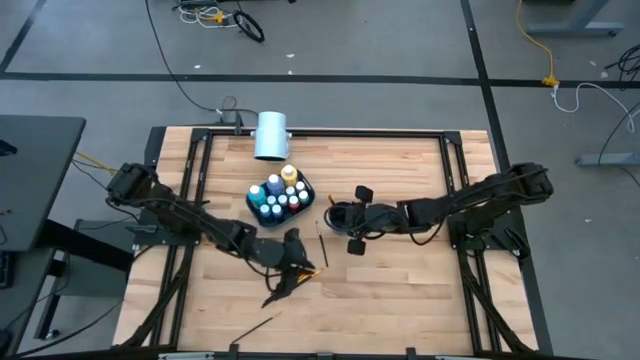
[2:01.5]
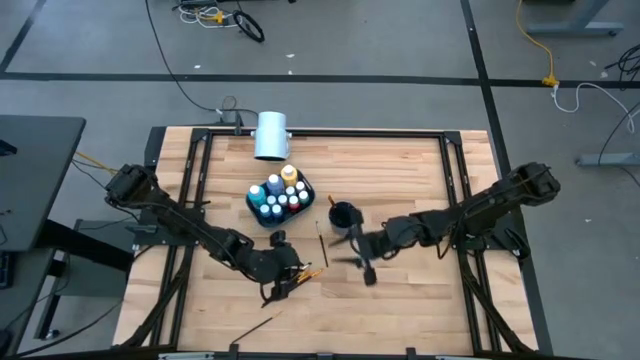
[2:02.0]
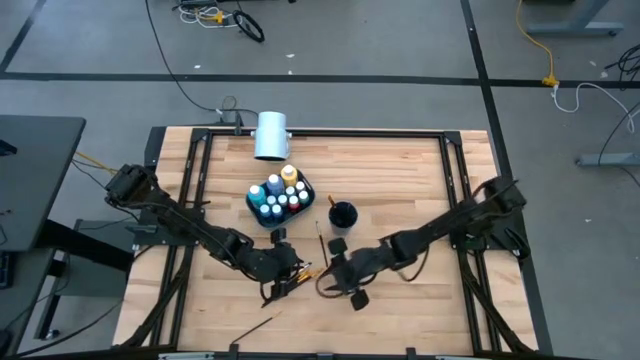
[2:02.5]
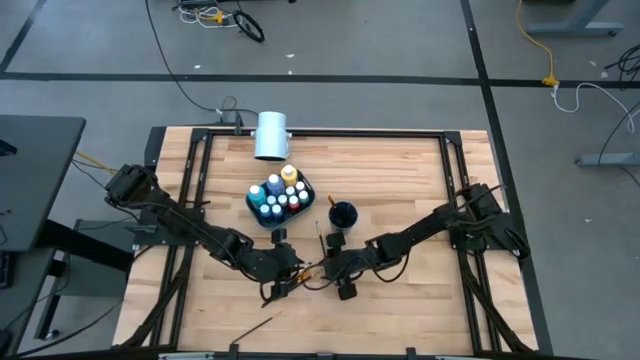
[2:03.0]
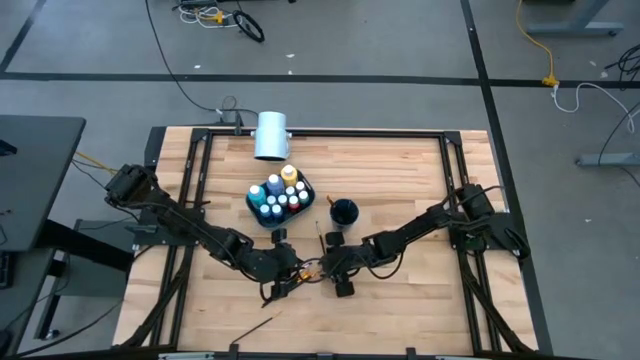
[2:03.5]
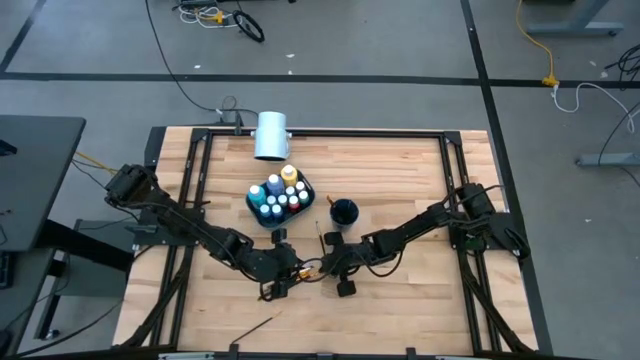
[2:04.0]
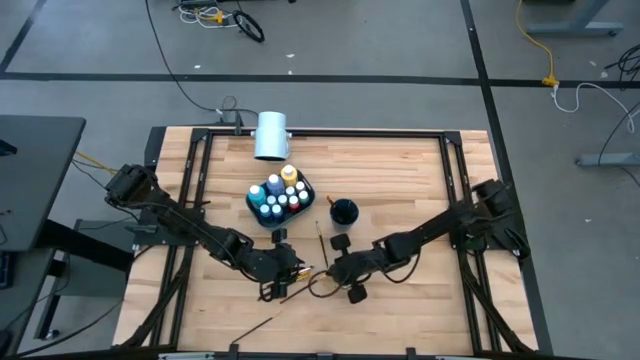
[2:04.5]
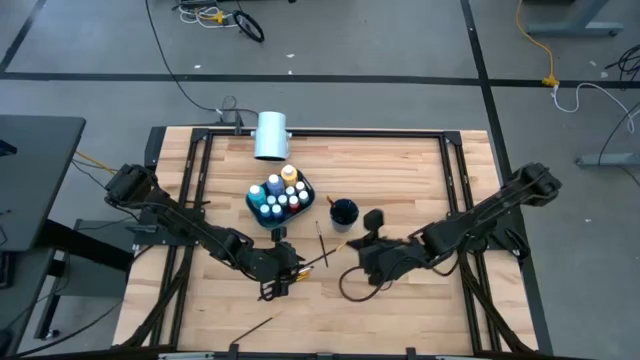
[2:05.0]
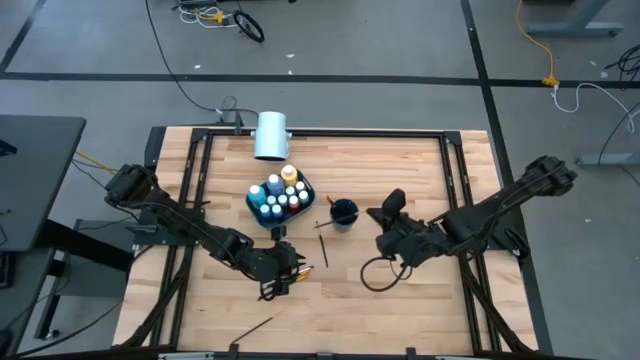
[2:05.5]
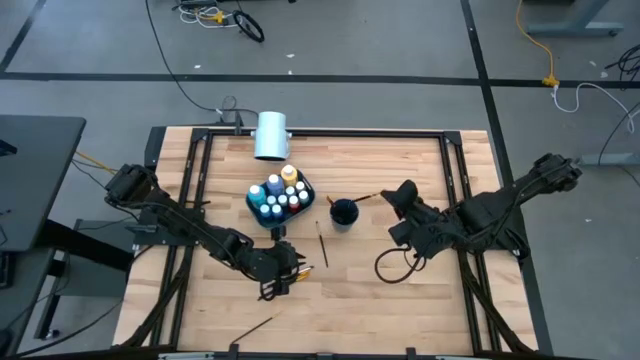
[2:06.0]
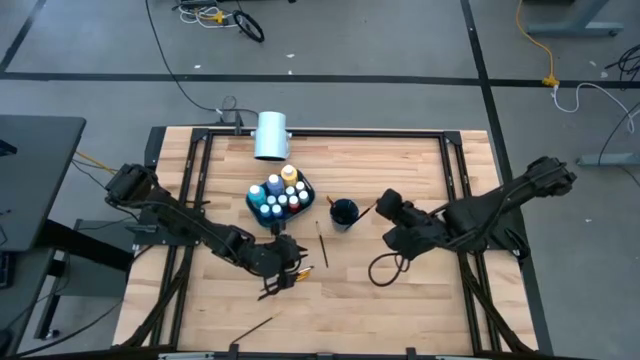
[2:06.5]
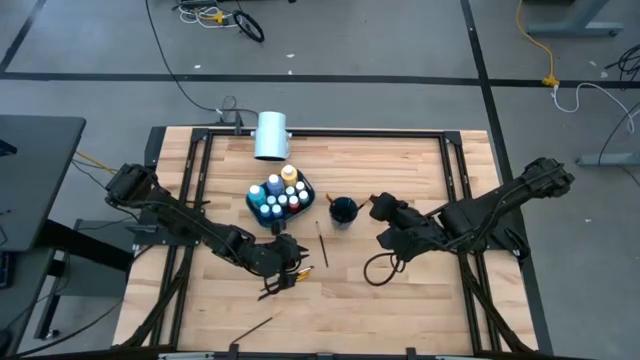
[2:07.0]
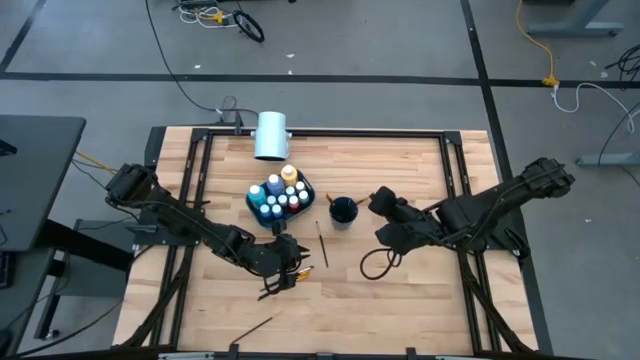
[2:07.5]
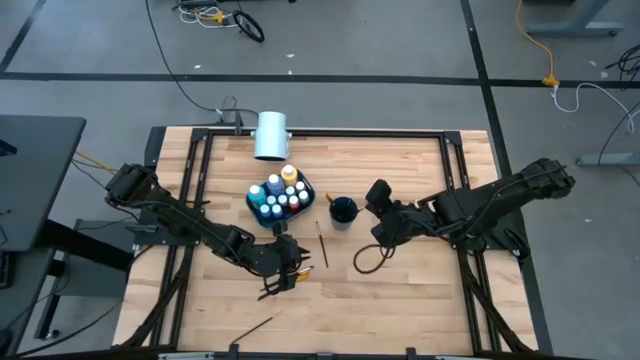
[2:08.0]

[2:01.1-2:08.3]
Task: Pick & Place Paint Supplies
Put the gold paint brush in the middle into the cup

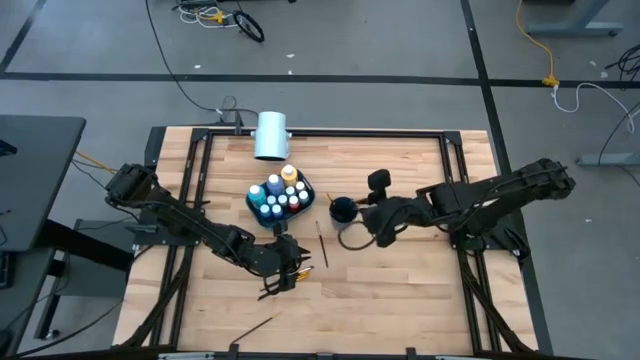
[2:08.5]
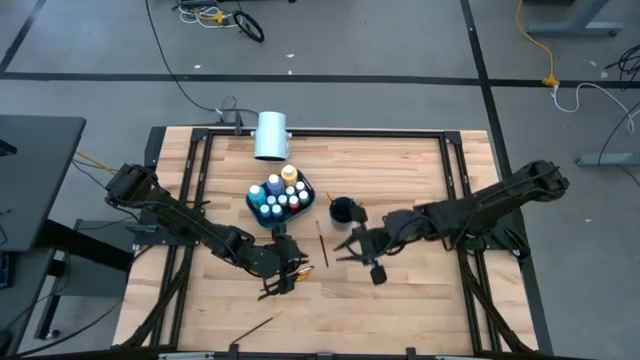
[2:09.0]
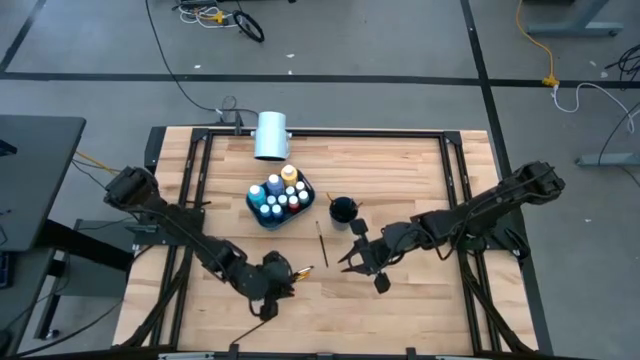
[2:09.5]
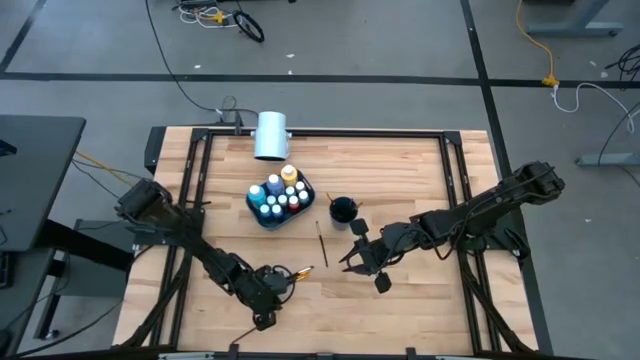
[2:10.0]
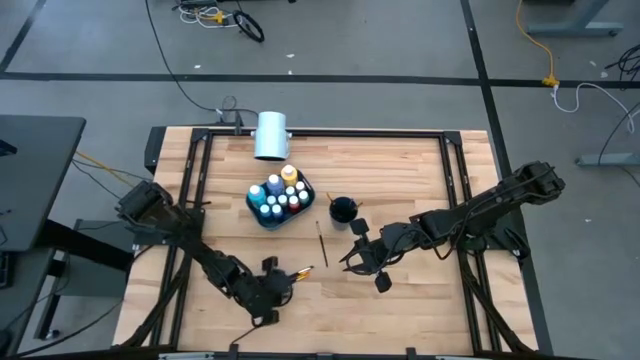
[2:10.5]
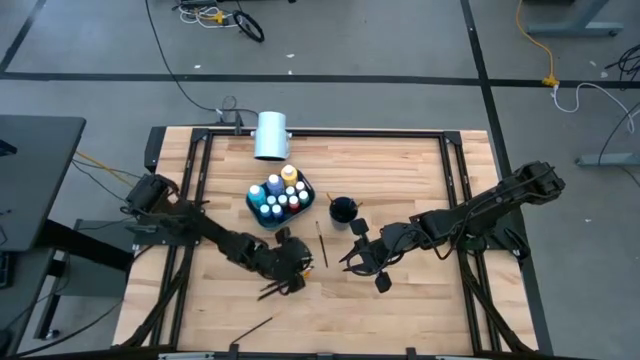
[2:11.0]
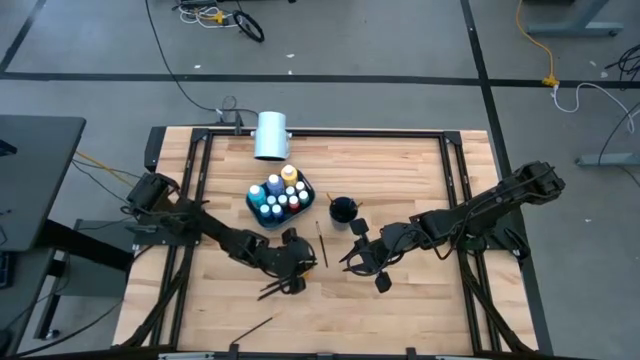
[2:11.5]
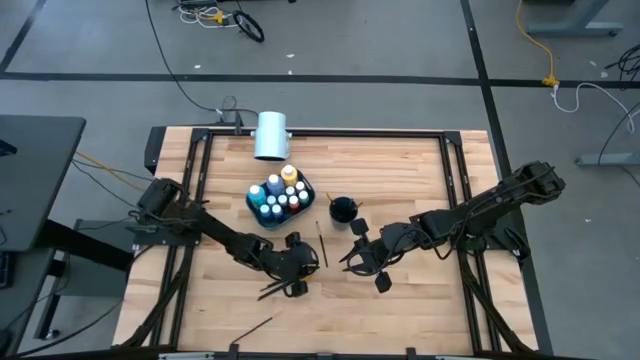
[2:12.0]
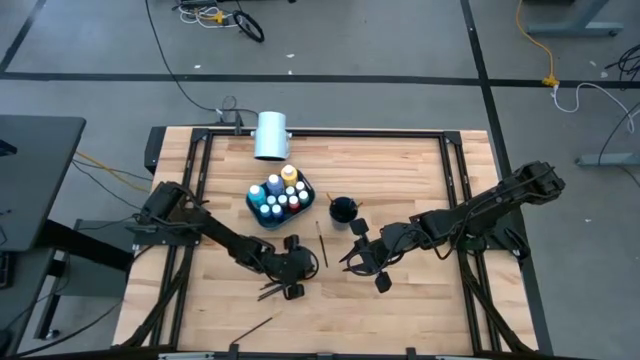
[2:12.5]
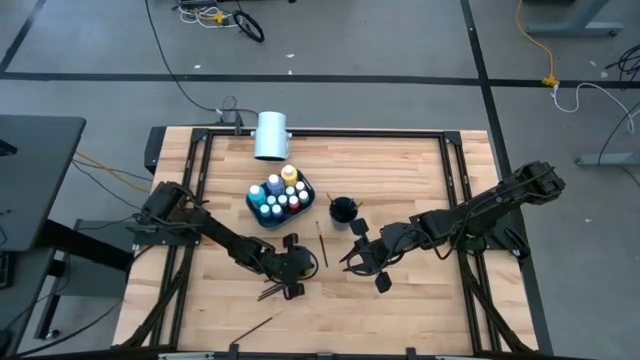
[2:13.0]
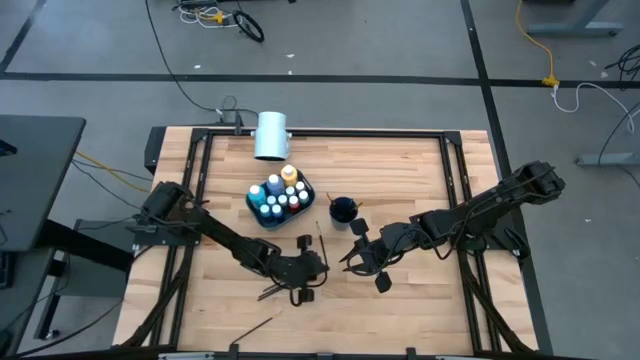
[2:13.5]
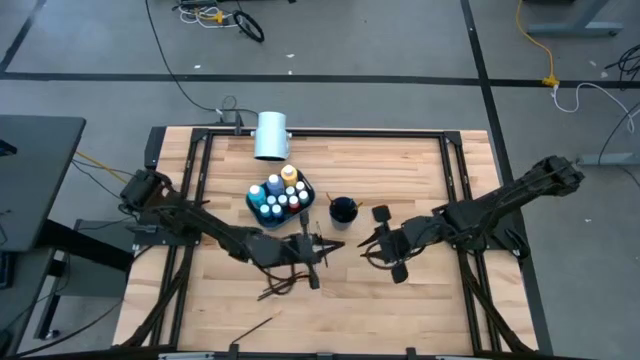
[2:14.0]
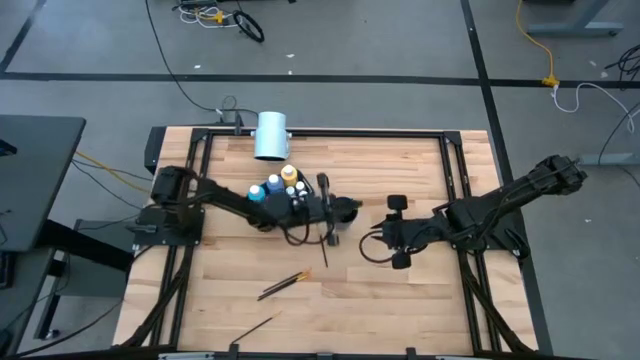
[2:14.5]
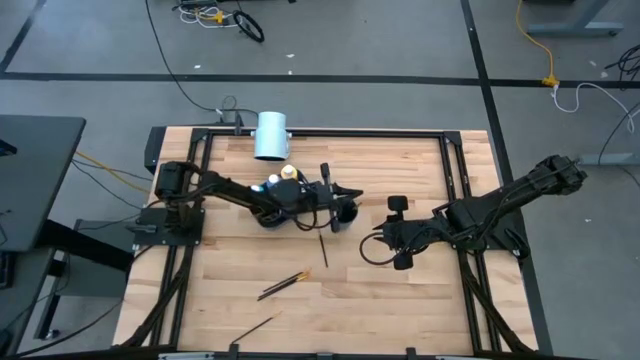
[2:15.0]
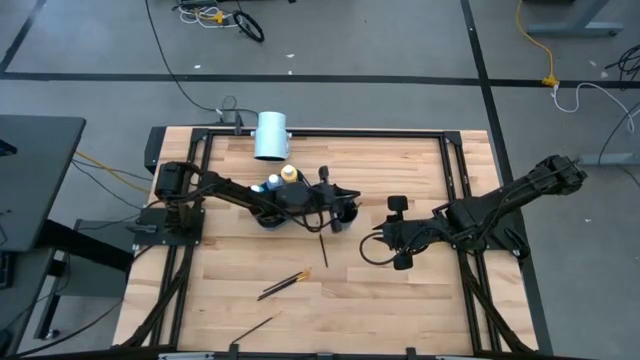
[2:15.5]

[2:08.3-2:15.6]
Put the silver paint brush on the left into the cup

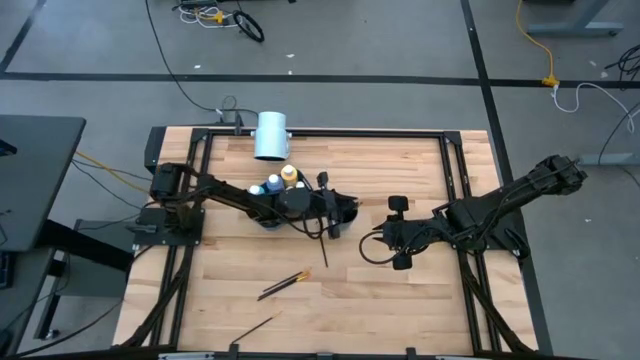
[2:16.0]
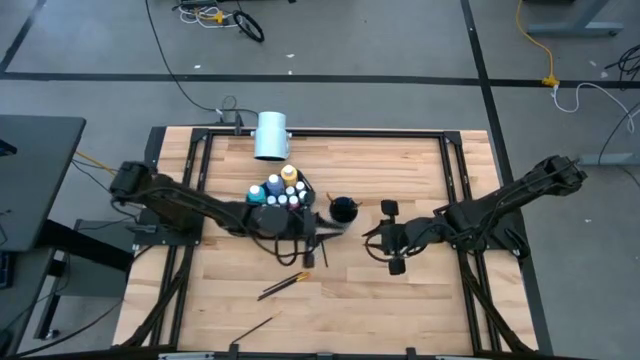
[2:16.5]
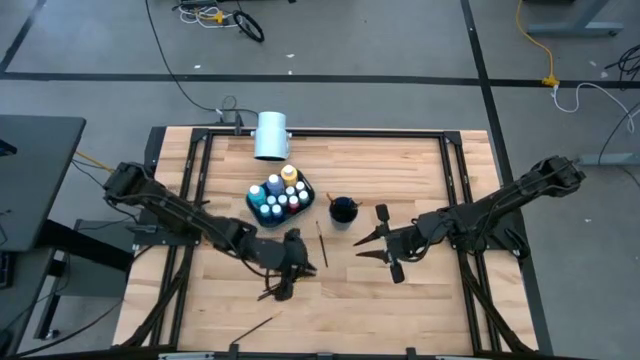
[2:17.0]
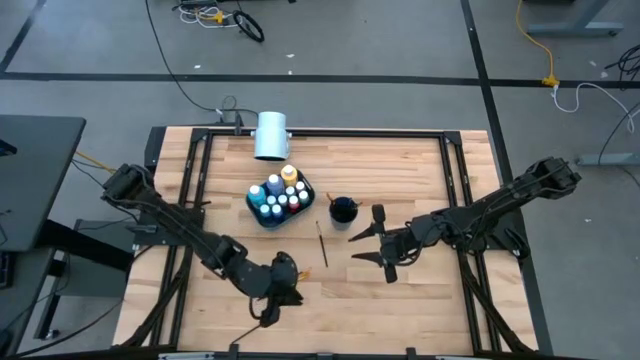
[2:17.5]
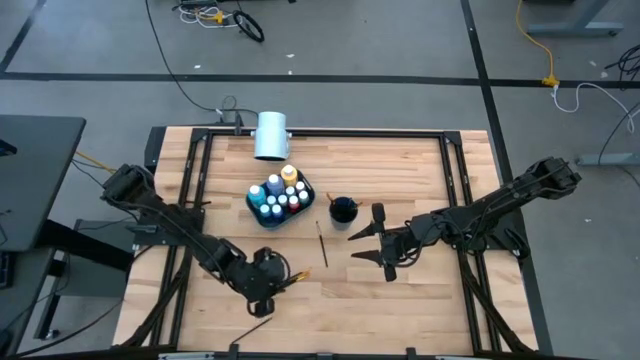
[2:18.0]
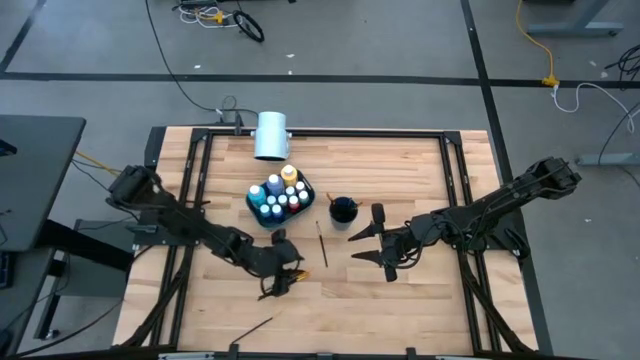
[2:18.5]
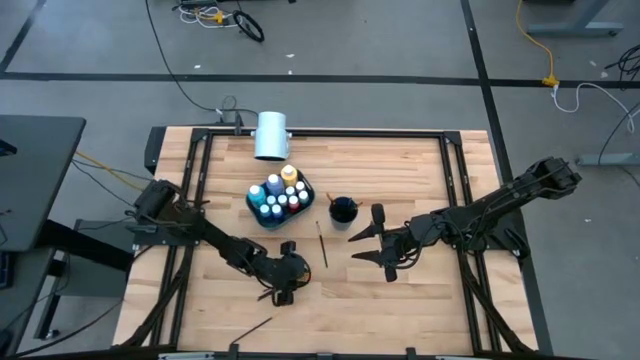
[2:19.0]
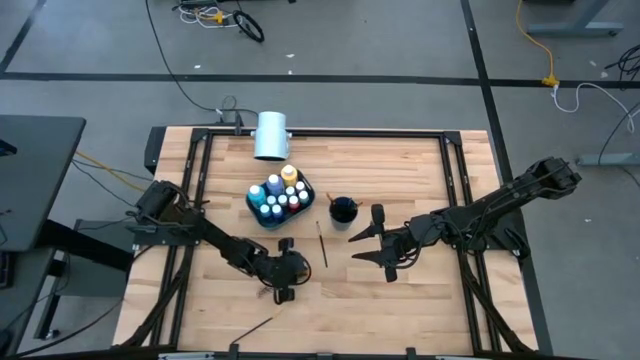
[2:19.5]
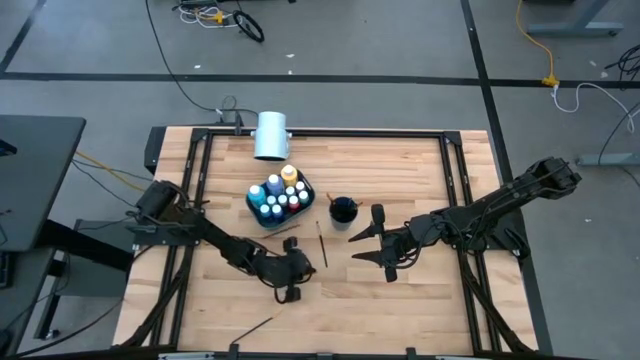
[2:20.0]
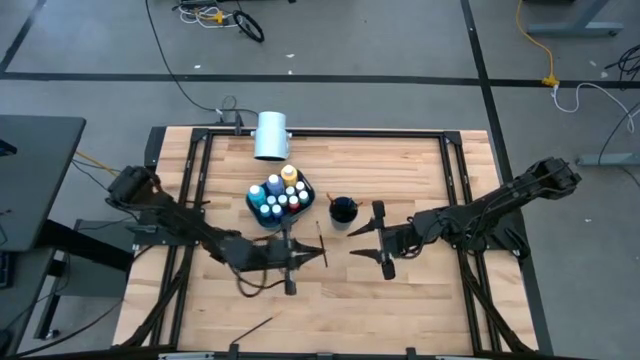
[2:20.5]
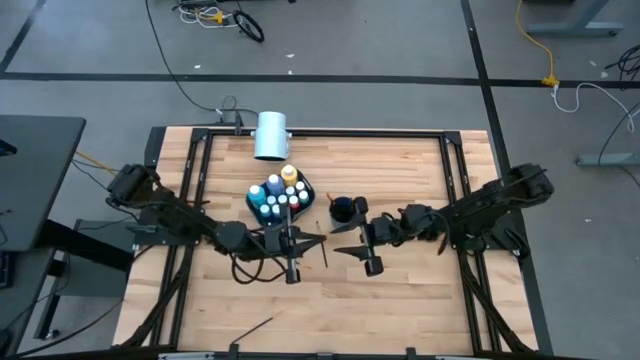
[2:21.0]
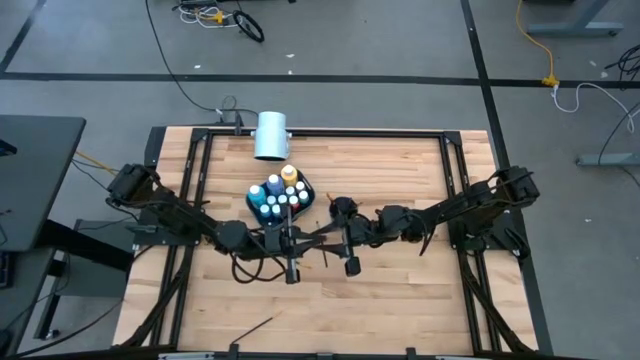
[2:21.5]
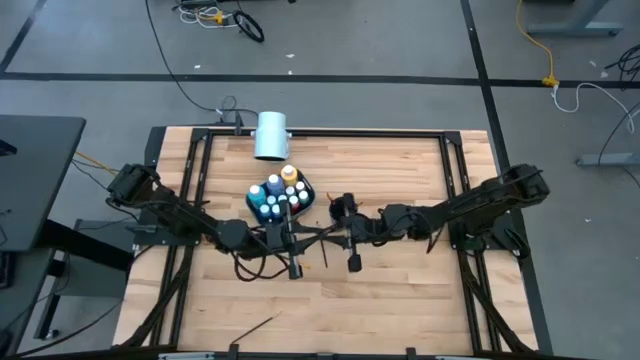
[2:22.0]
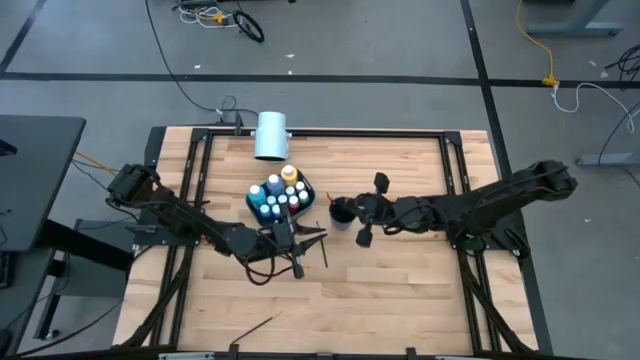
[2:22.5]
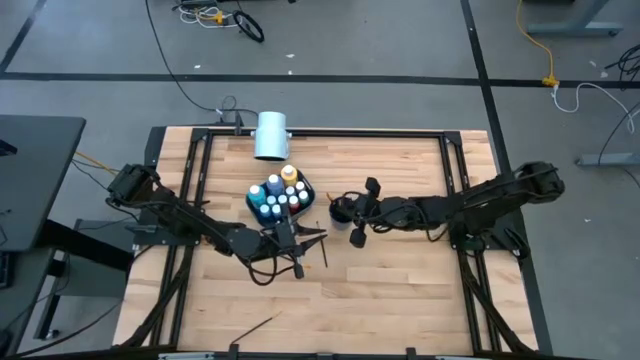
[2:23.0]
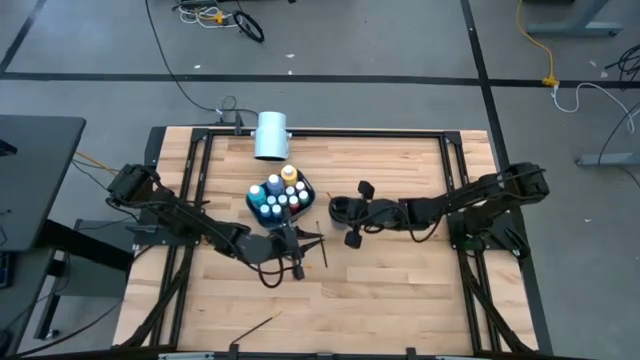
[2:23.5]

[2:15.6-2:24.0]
Put the gold paint brush into the blue cup
